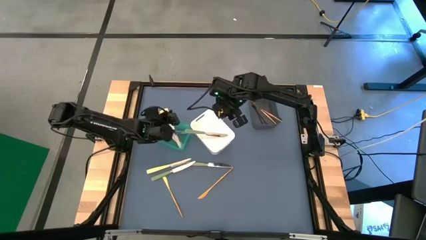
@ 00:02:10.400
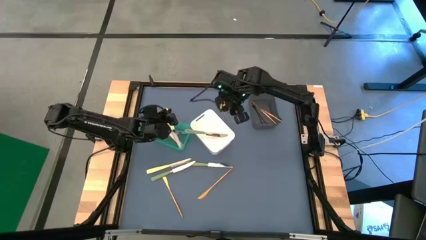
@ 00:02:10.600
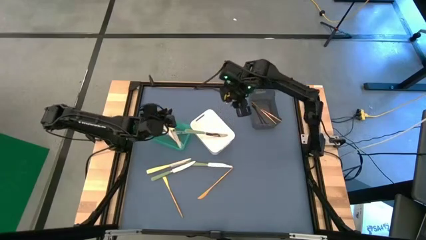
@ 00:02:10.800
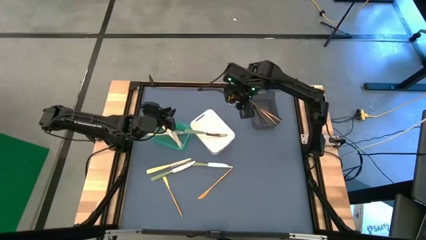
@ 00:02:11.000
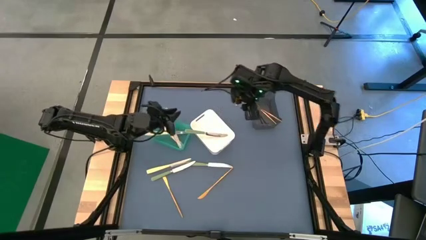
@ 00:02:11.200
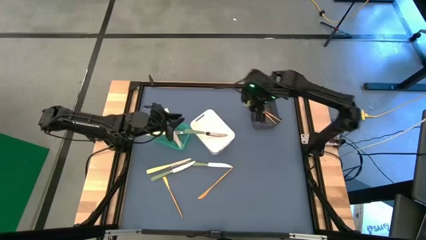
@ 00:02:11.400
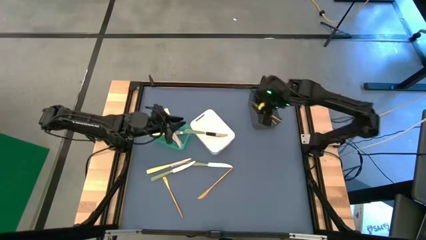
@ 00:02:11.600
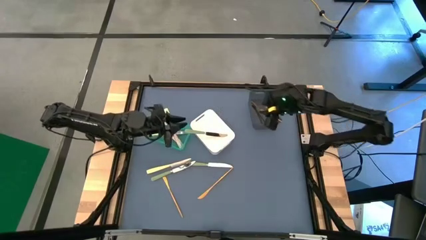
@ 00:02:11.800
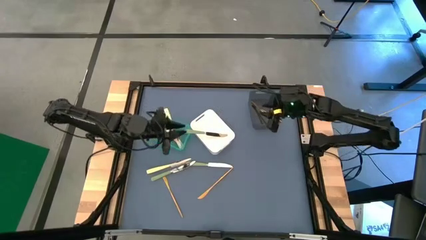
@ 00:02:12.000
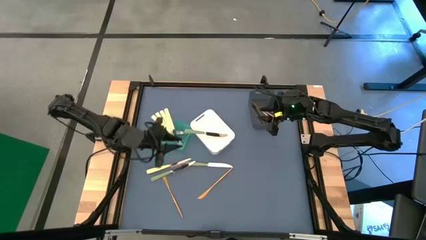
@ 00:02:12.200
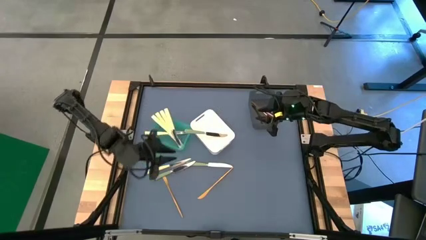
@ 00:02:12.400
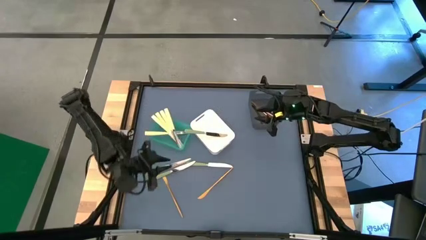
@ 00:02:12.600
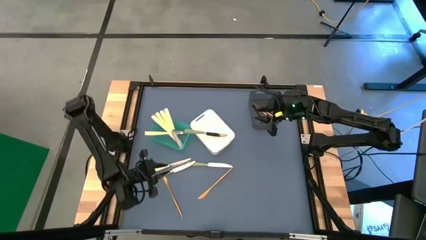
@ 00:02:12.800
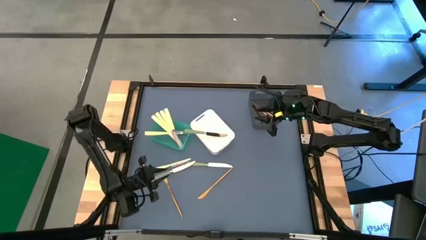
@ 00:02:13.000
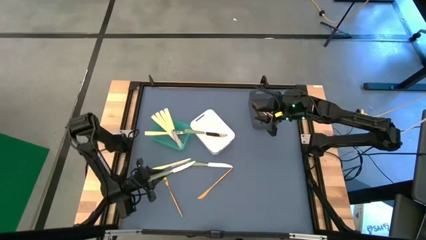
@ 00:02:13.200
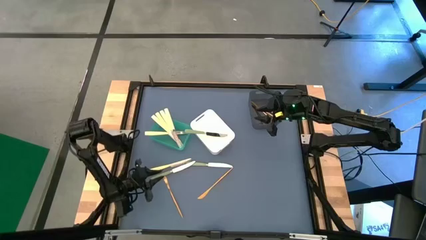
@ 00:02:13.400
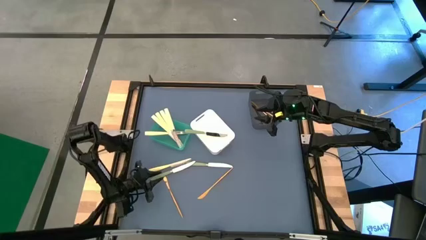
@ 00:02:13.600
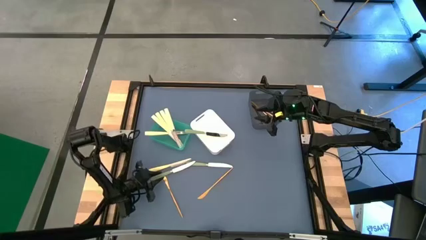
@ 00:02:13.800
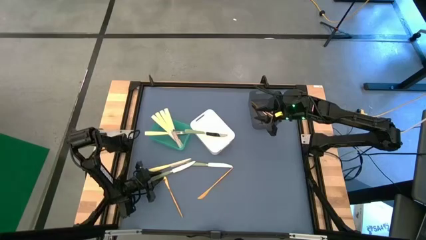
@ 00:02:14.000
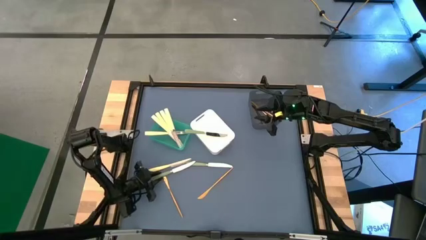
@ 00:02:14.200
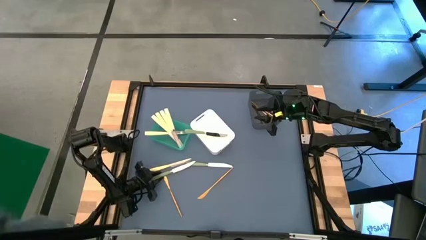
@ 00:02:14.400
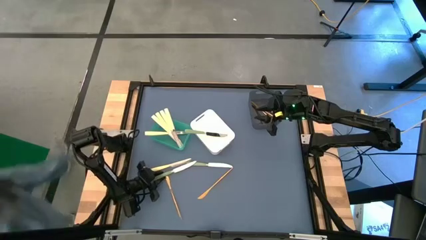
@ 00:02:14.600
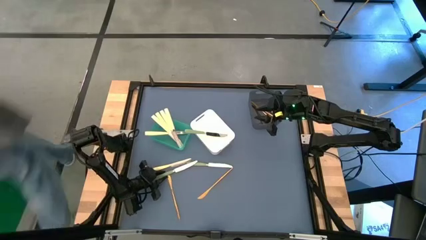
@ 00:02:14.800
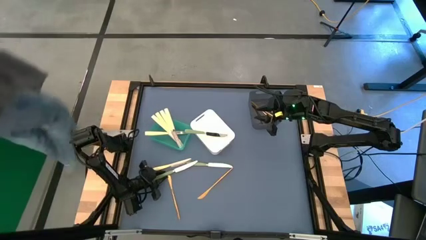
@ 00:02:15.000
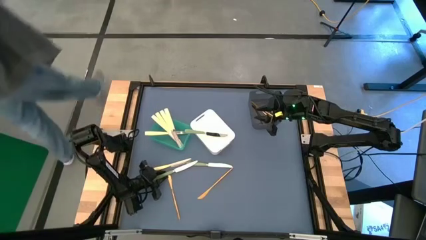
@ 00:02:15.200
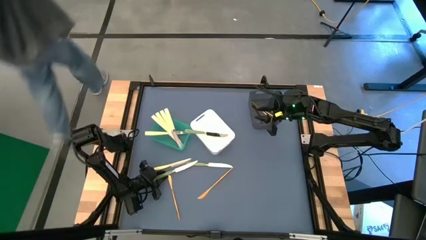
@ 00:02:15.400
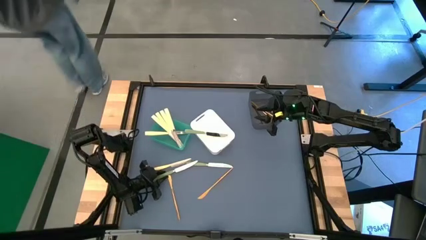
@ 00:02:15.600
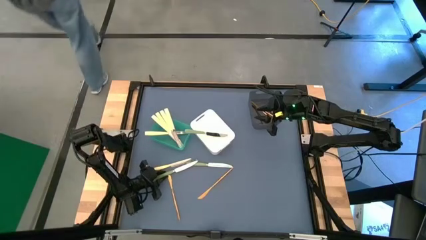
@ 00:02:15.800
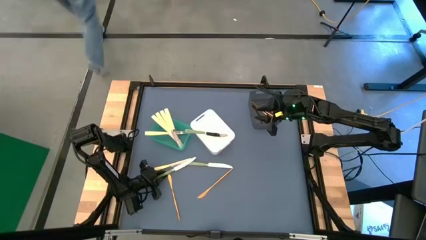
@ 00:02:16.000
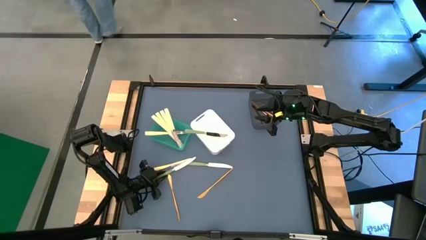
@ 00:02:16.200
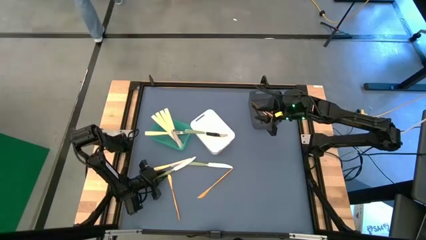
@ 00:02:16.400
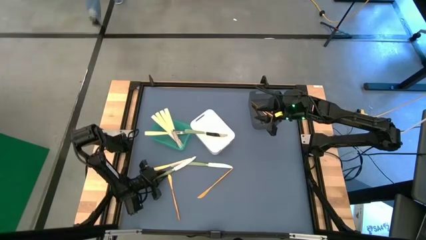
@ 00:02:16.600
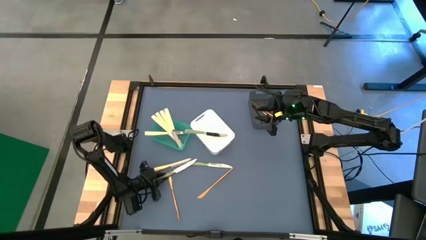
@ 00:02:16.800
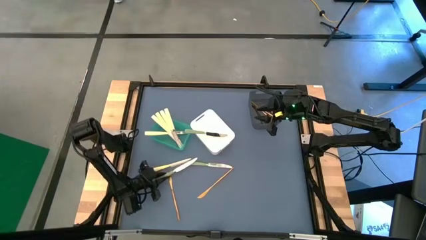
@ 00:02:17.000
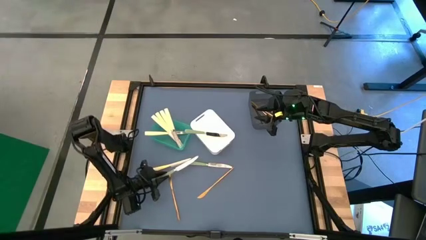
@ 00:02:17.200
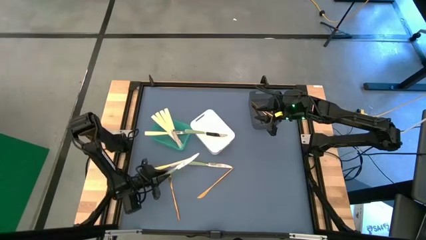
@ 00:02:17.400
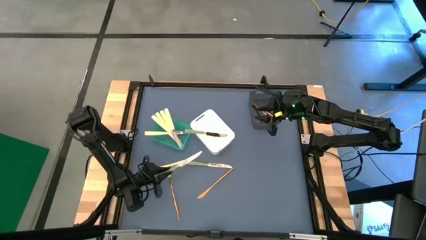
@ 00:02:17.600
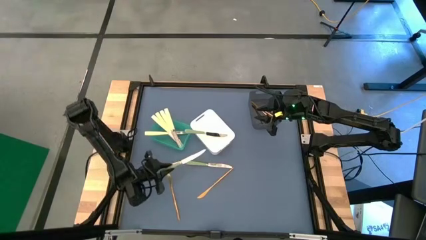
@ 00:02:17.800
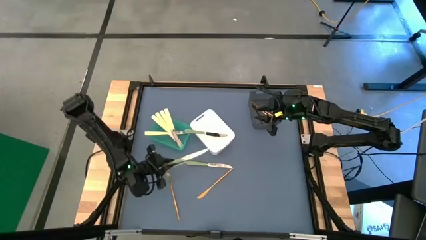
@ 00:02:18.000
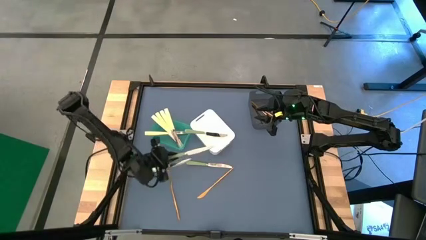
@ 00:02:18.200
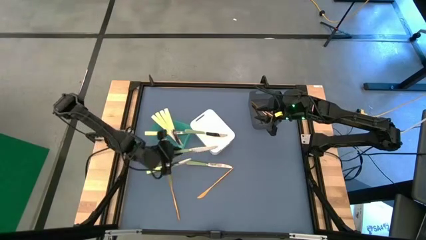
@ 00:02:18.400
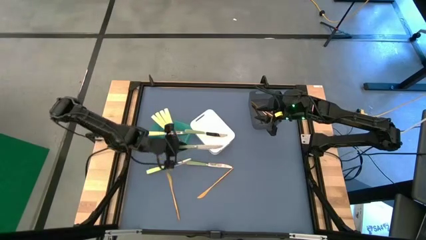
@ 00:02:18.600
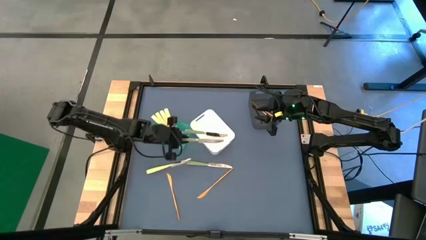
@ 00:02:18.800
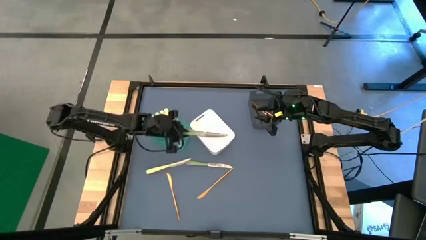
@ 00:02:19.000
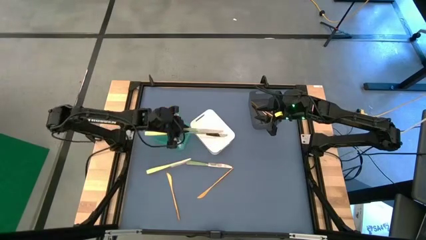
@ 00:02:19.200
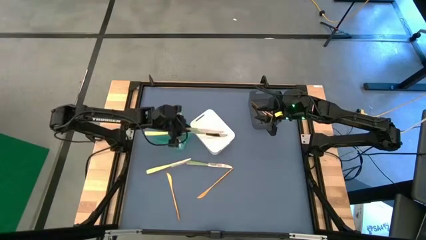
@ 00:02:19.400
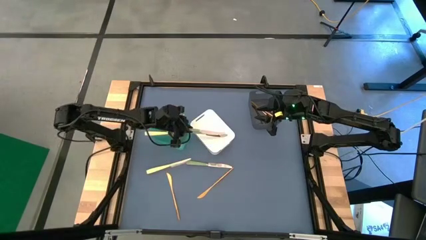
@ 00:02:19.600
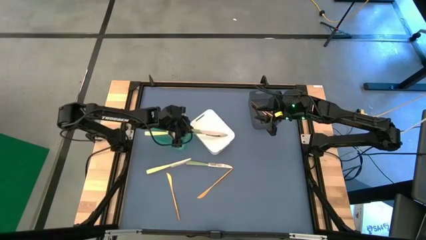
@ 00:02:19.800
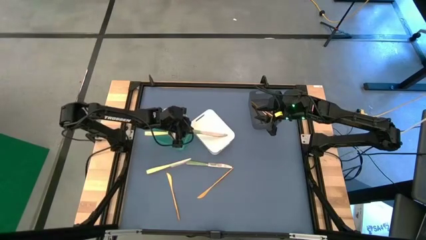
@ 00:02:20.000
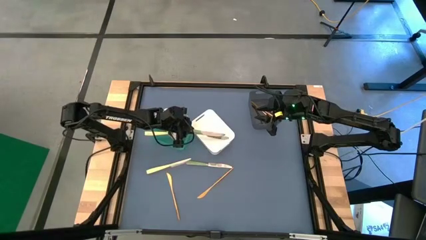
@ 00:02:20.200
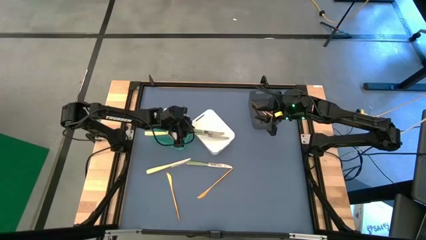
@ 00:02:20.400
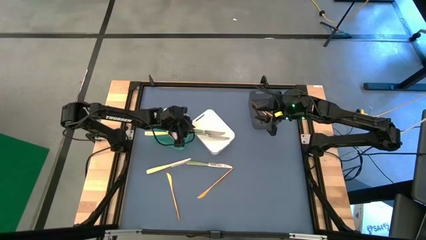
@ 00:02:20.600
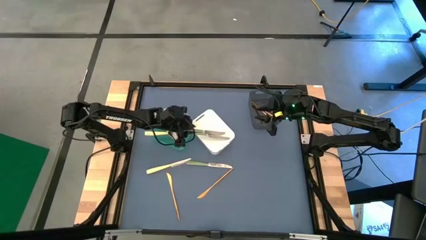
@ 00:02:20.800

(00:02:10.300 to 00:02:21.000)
Task: Sort silverware by color (type)
Put the left green table knife into the white bin

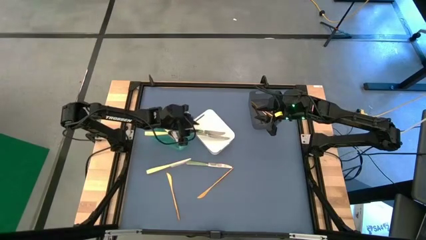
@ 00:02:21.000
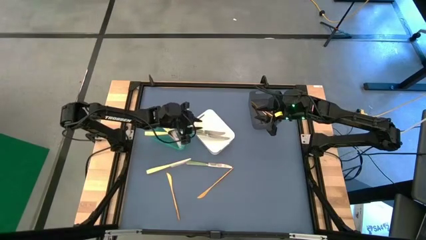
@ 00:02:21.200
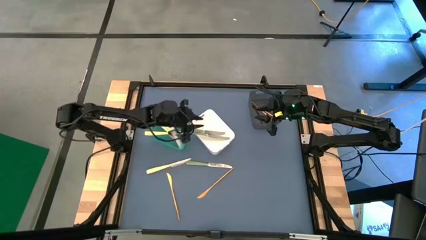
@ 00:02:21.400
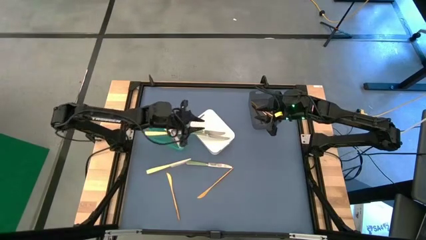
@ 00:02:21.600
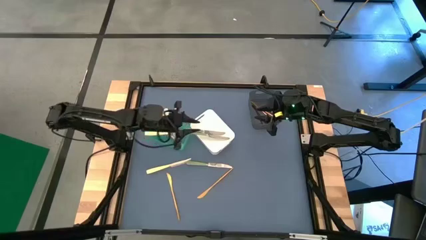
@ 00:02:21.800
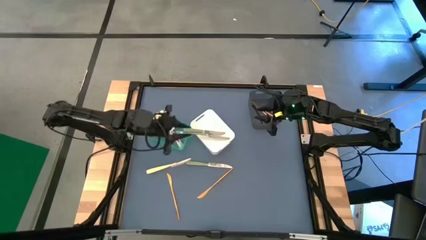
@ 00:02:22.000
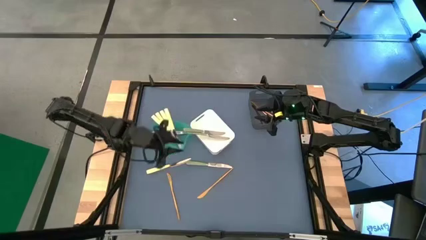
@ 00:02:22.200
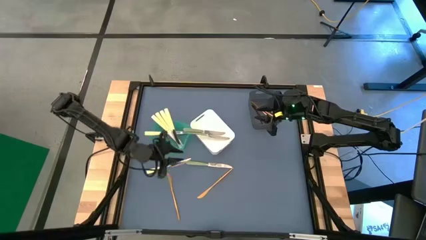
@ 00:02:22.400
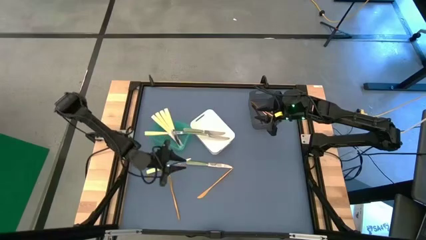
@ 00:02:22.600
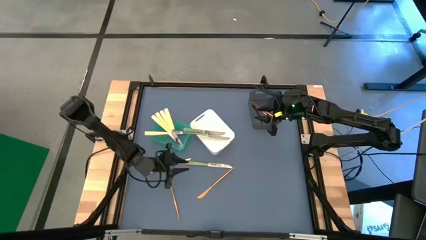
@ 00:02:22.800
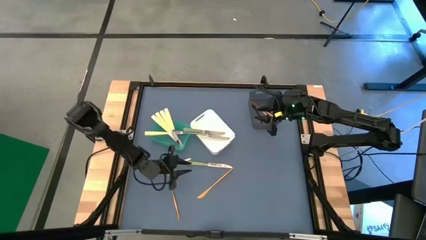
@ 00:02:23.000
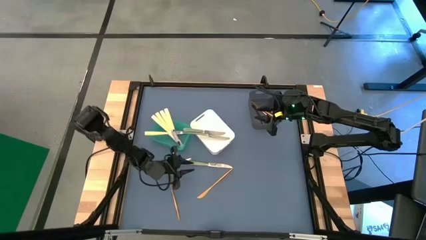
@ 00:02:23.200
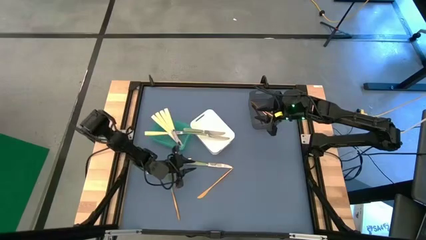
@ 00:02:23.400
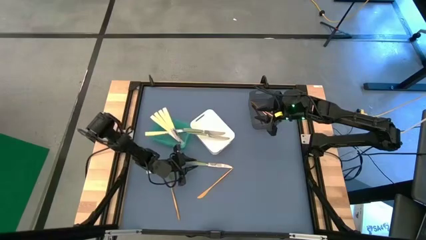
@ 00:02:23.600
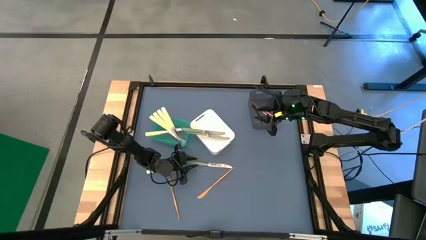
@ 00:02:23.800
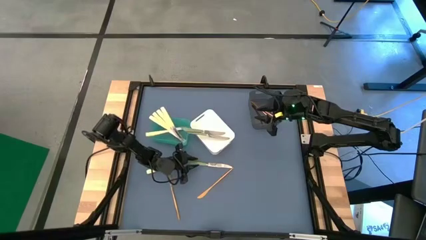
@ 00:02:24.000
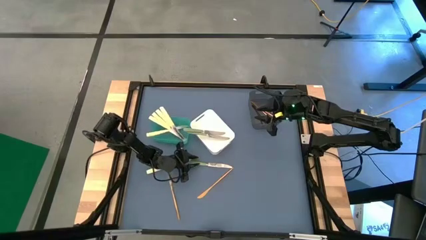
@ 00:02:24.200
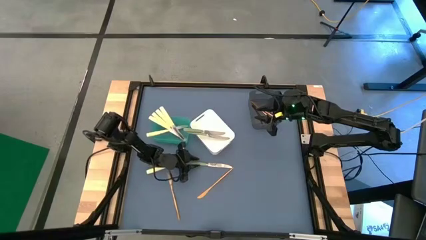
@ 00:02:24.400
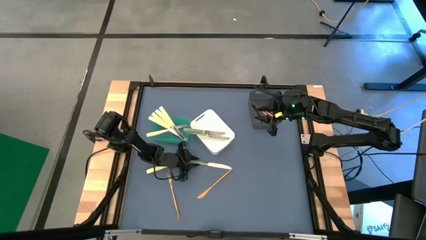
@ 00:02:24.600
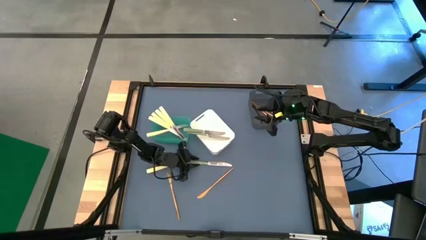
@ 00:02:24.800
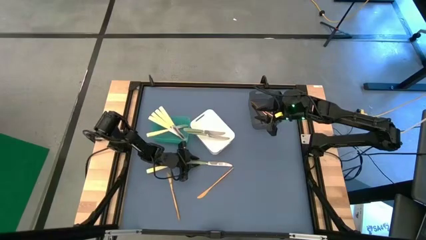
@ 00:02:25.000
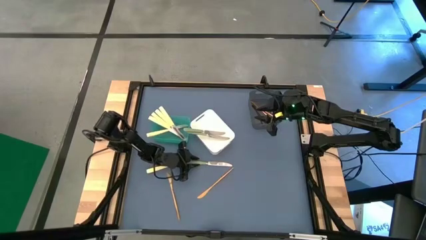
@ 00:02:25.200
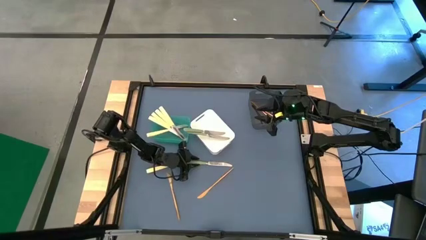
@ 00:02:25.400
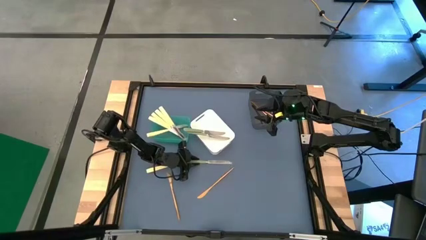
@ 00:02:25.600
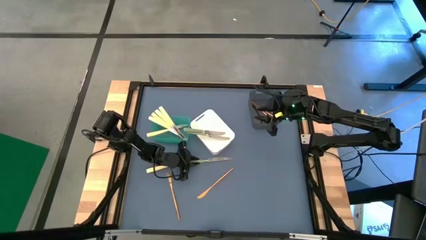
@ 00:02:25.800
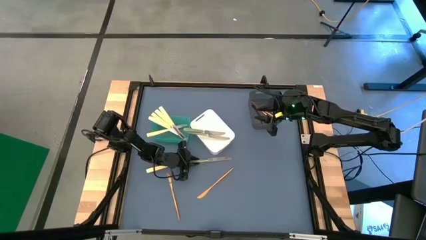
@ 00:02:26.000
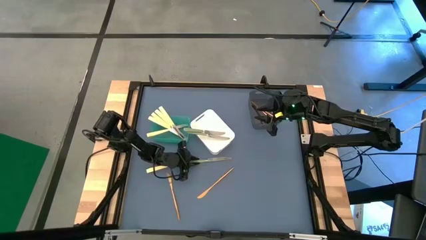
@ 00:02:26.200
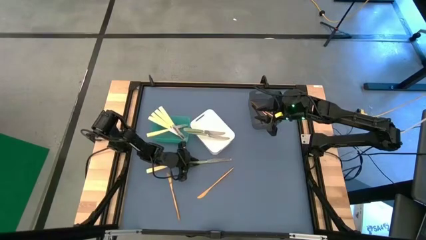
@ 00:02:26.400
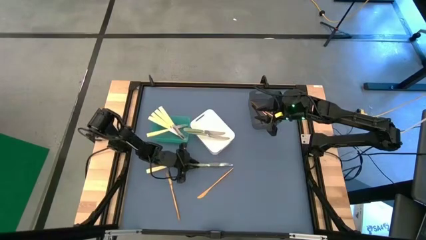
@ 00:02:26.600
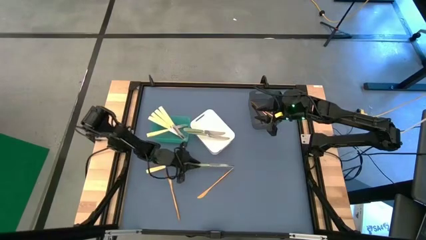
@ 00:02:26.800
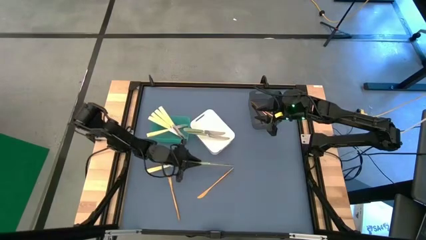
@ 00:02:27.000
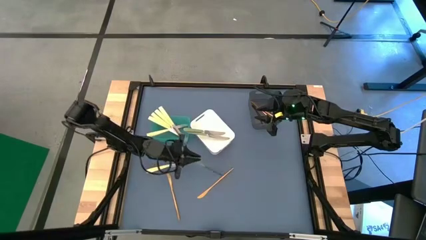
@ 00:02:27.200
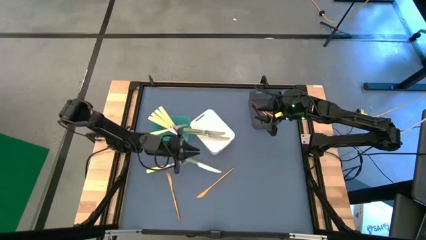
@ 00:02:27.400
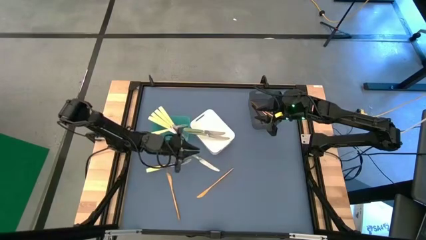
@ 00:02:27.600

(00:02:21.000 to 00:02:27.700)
Put the green table knife into the white bin
